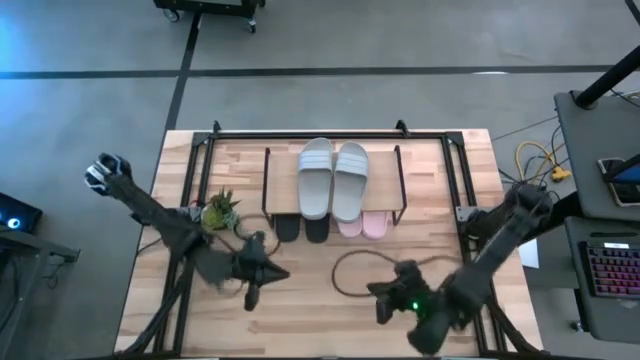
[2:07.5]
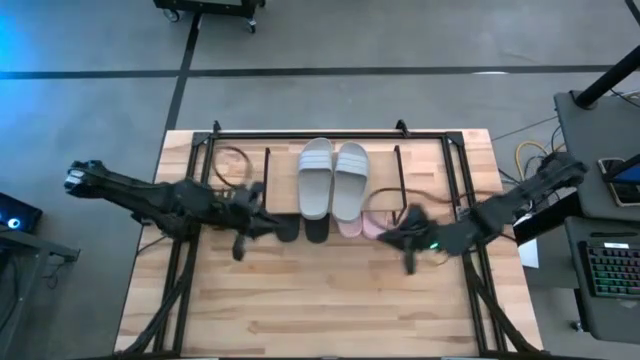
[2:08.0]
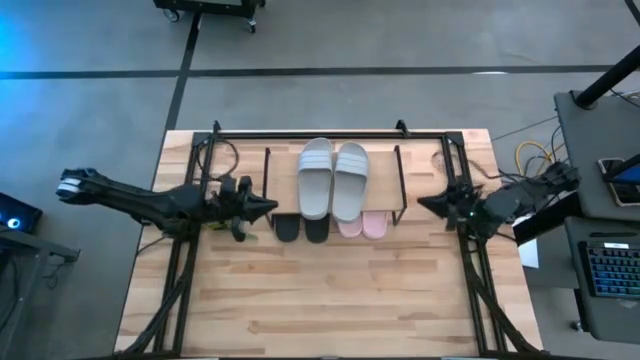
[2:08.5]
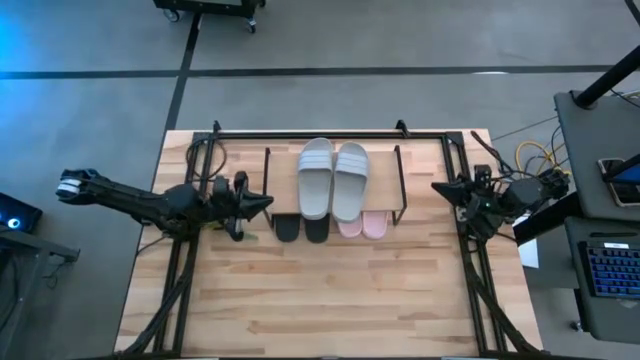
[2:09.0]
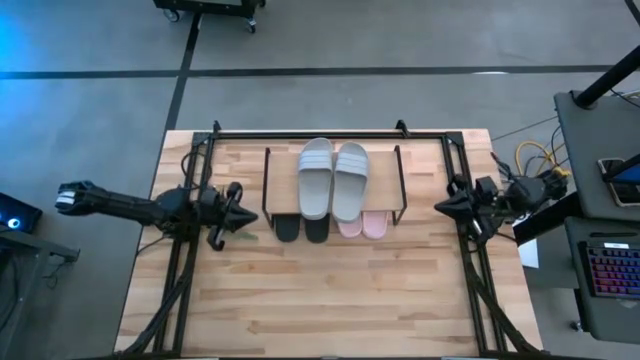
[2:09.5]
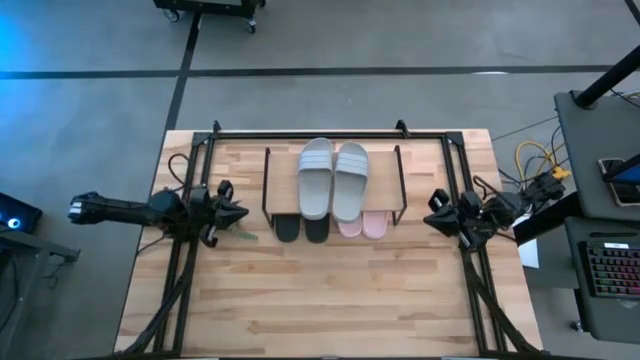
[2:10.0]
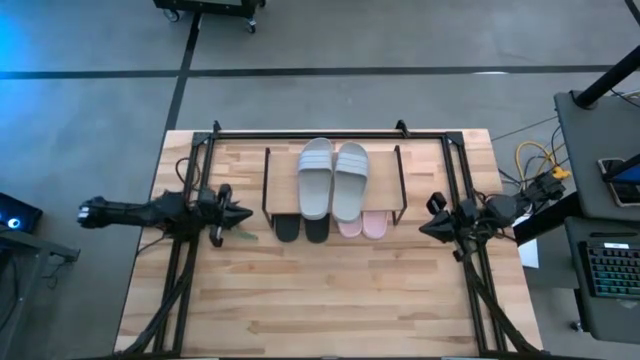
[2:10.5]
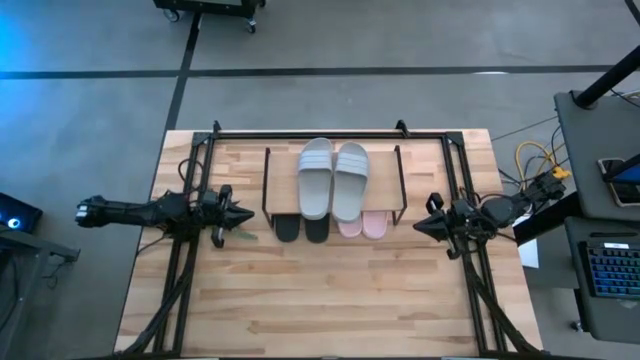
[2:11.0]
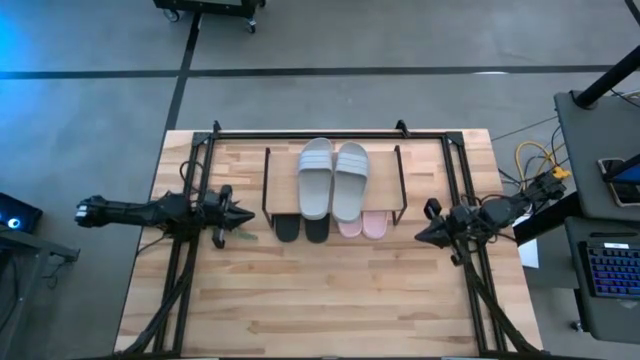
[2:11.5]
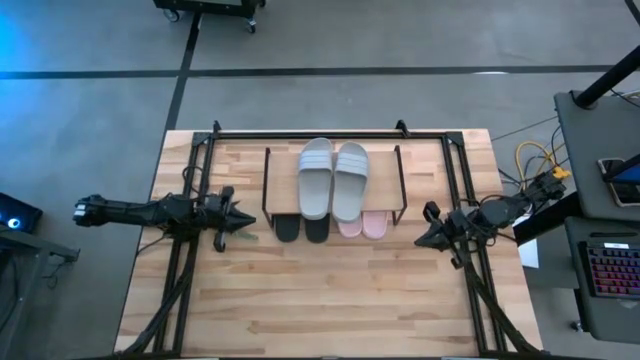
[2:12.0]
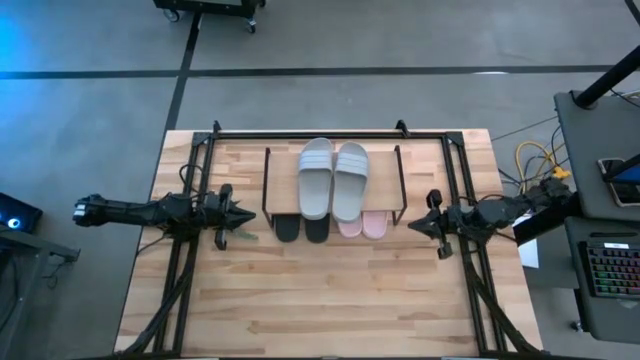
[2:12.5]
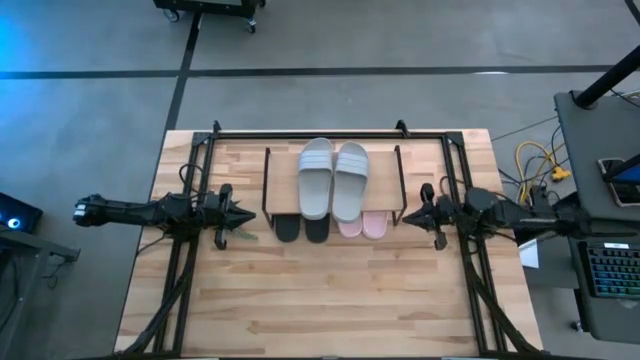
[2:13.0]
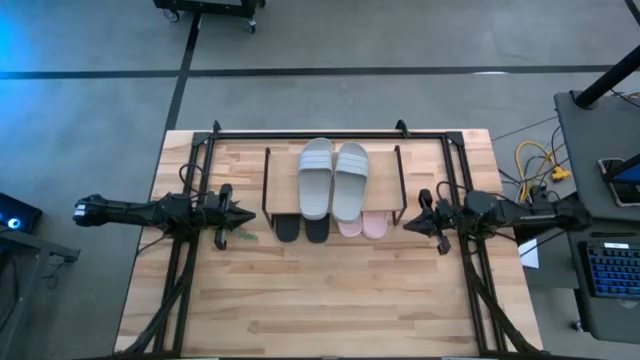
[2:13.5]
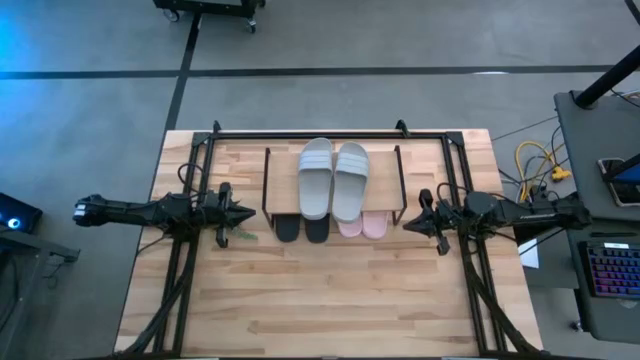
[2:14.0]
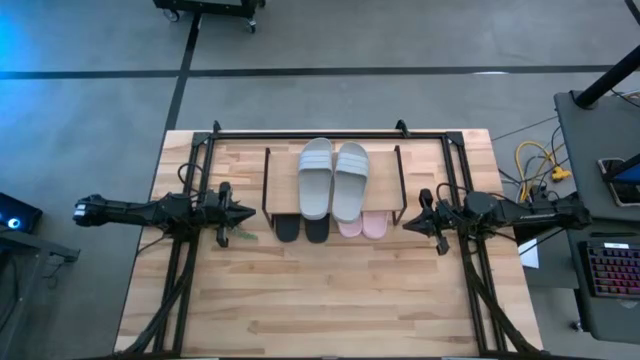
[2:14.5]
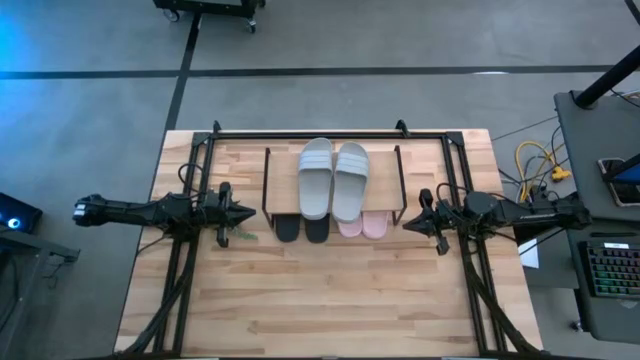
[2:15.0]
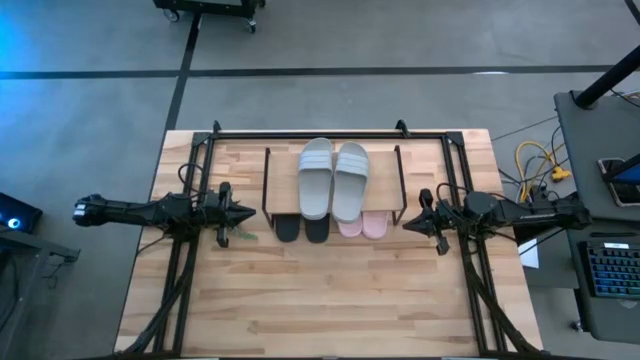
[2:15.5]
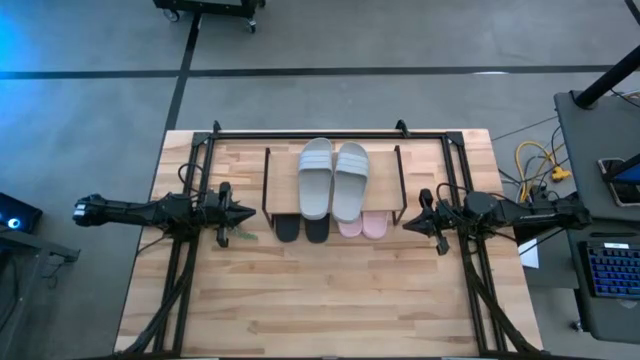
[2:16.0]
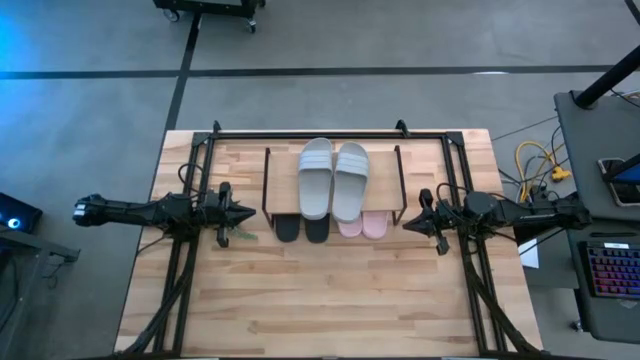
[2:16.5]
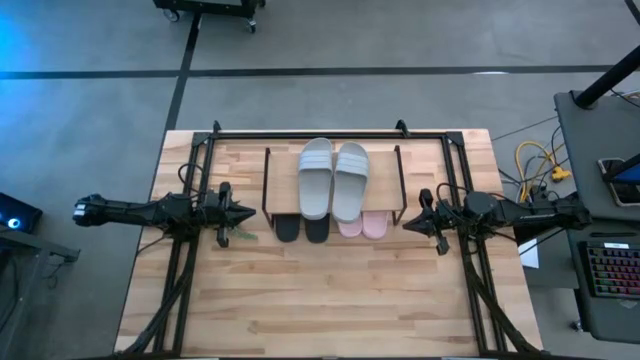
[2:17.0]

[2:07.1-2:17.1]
Task: Pick and place slides into the shelf
Return to Home Position

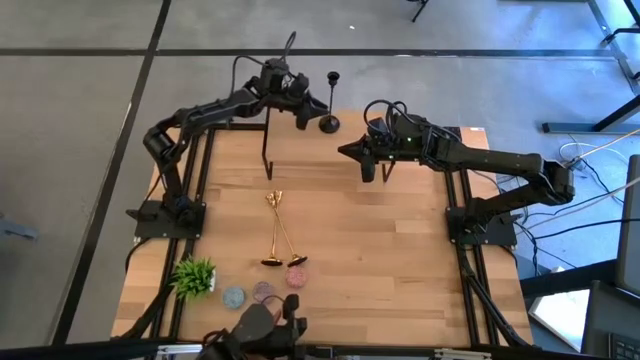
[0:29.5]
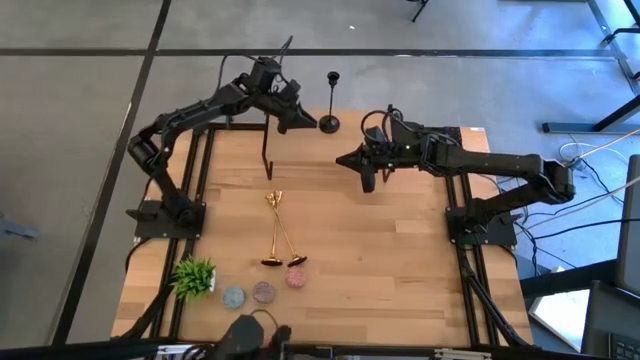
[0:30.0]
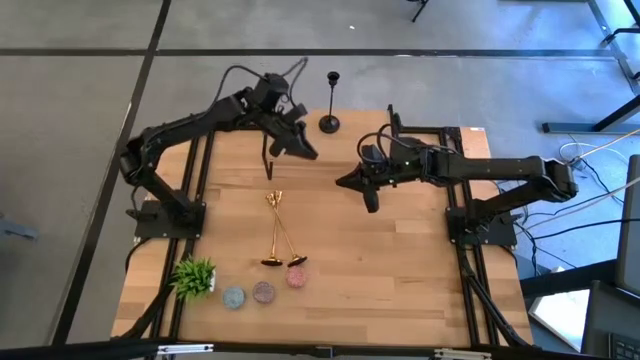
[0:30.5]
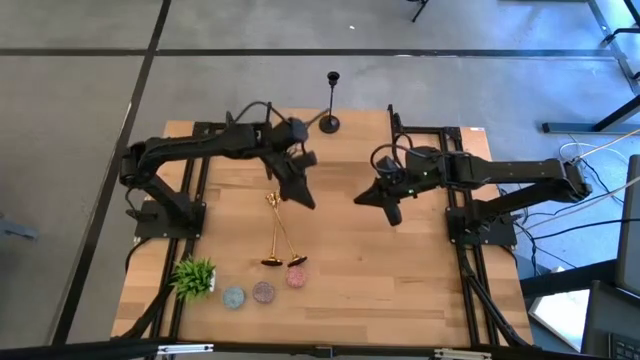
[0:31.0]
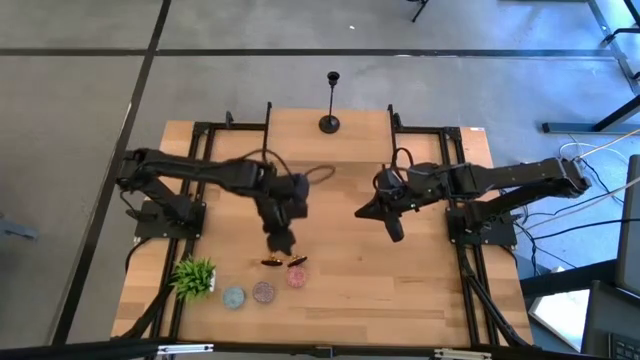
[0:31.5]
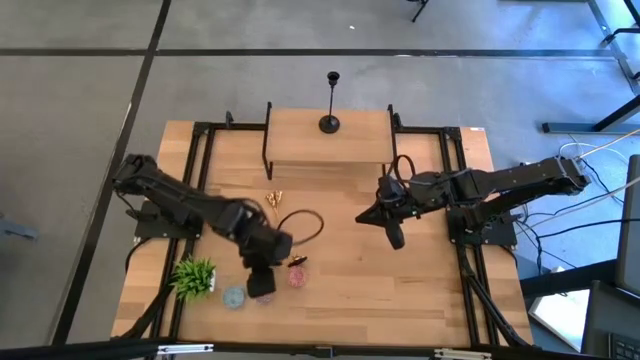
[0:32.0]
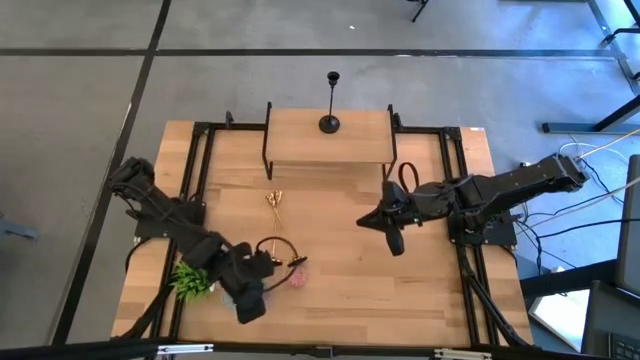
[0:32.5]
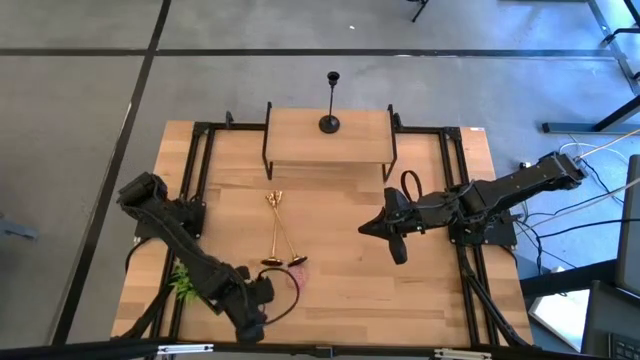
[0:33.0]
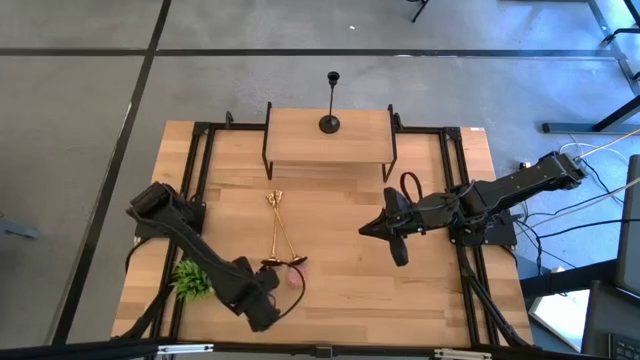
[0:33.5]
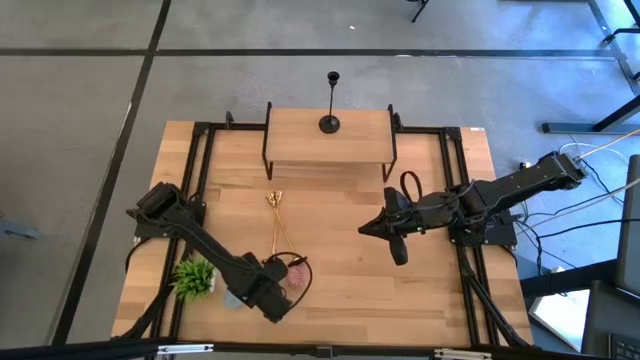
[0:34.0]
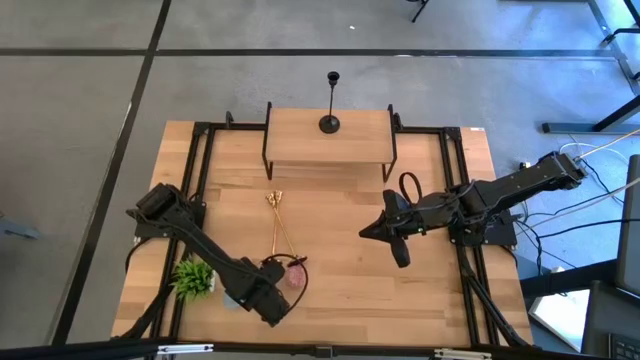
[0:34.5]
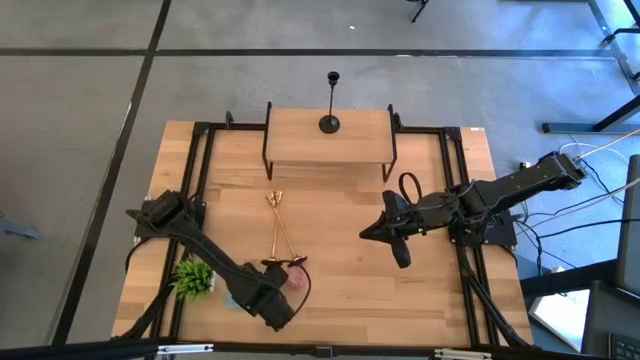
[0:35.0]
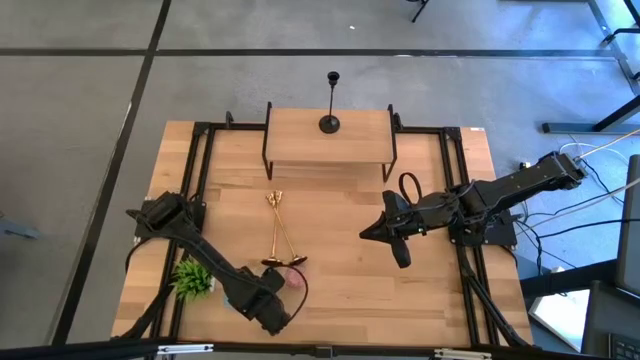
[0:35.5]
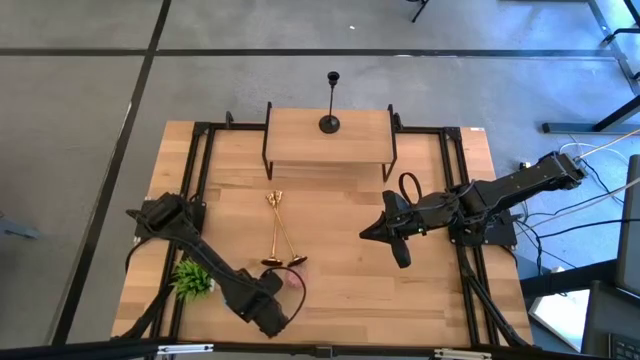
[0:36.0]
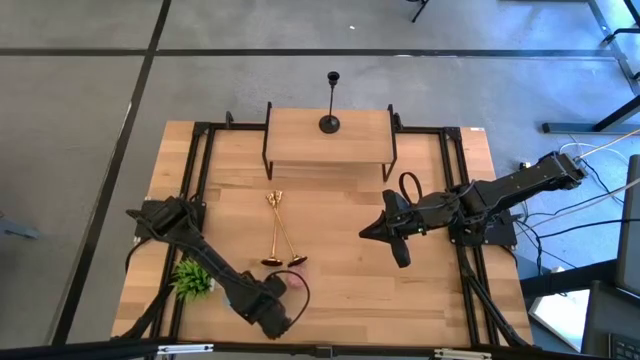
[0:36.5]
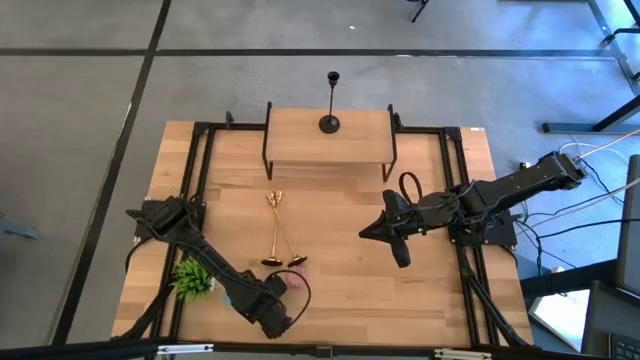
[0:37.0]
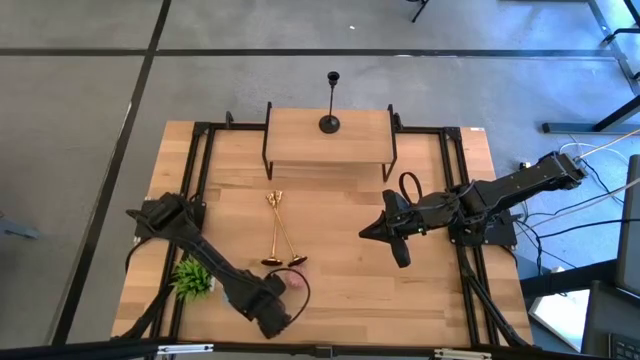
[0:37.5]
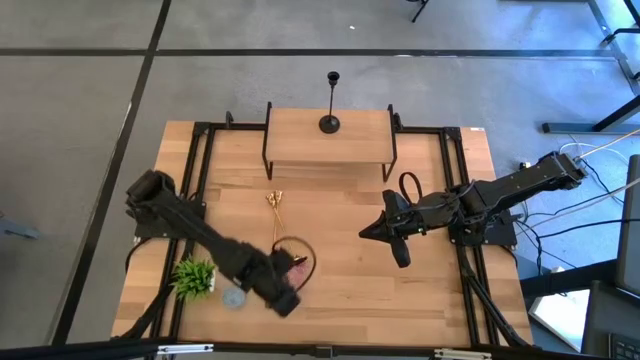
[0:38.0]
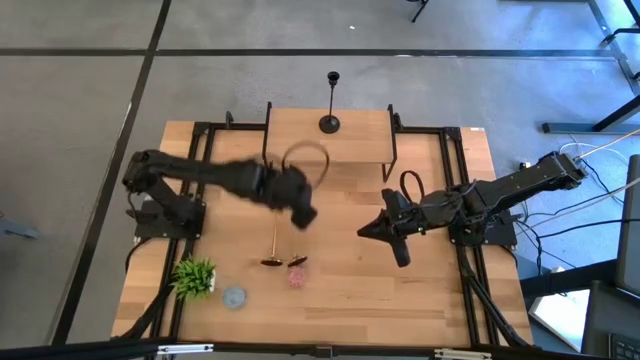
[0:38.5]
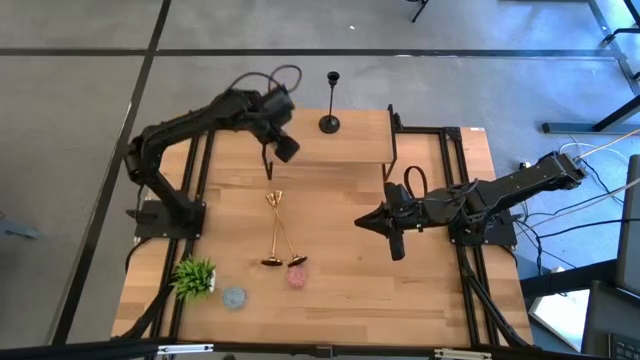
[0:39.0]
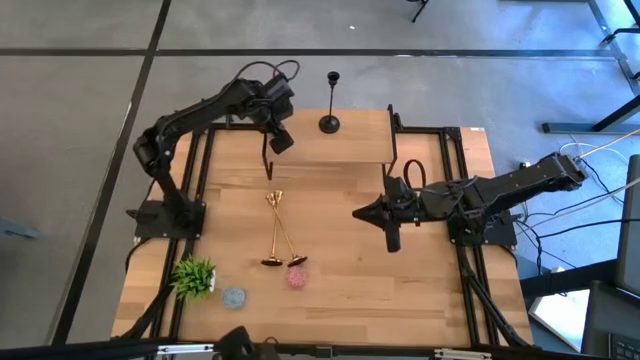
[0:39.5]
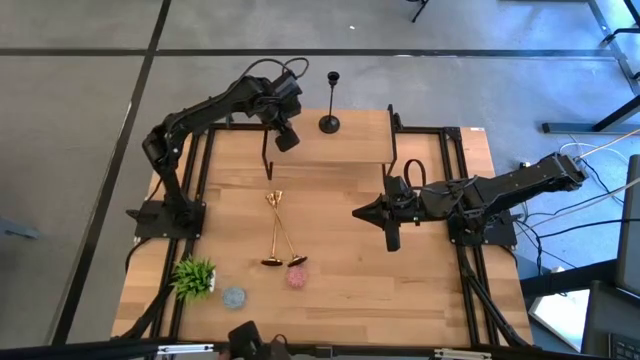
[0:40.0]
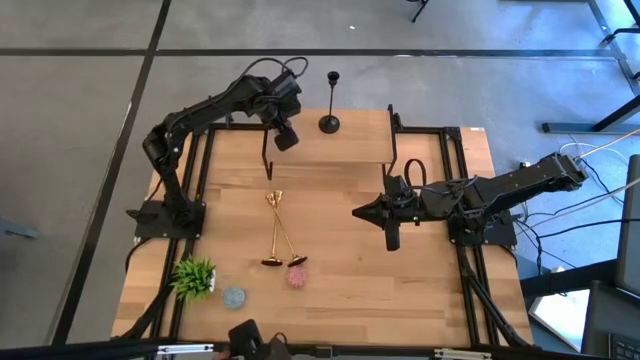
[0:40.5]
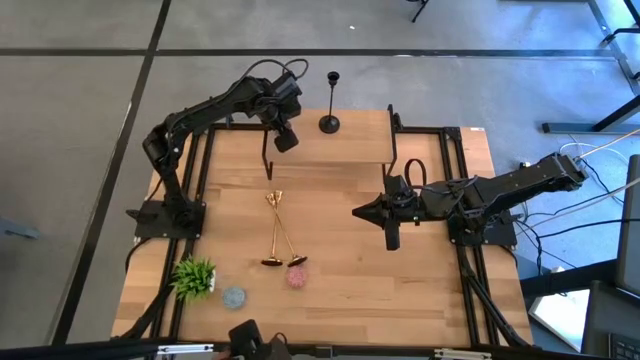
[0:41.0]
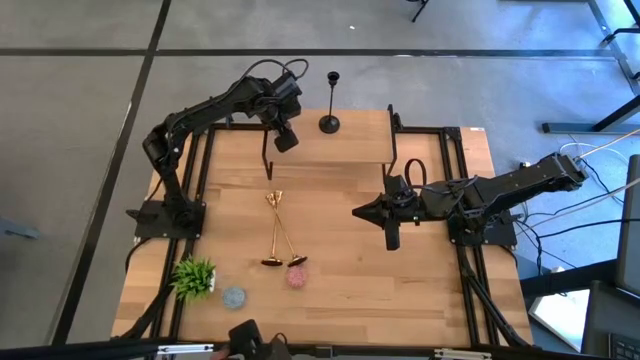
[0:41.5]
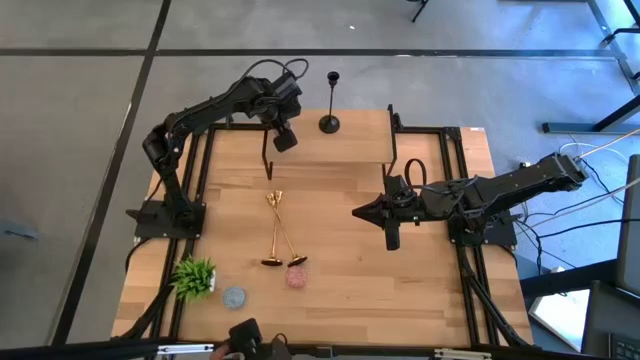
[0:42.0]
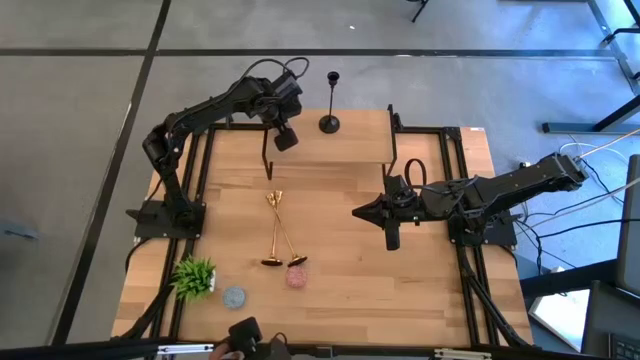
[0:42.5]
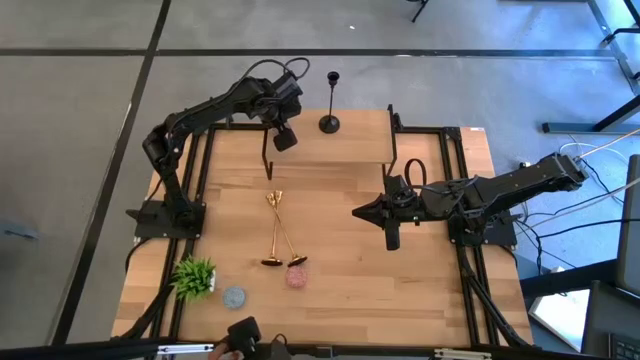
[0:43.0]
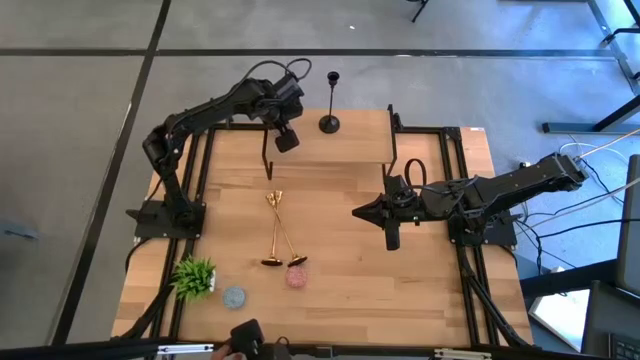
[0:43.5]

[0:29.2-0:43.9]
Task: Pick & Place candle stick holders
Put the red scented candle on the shelf
